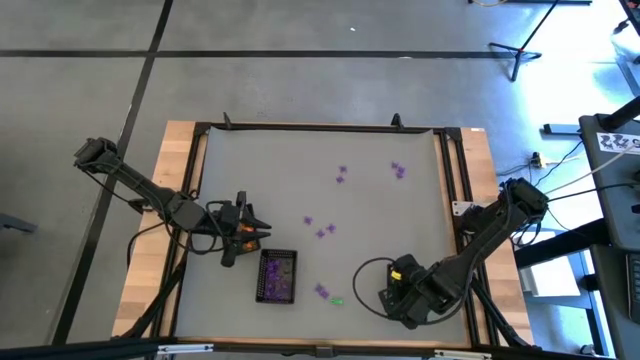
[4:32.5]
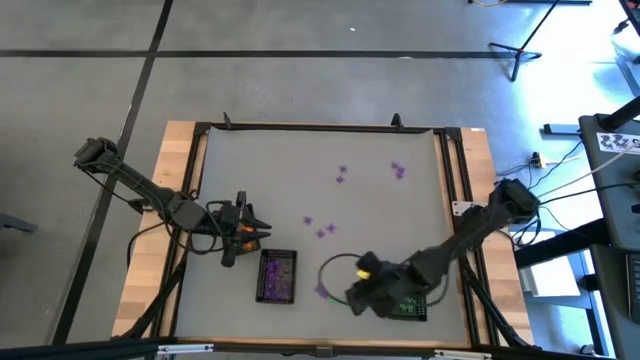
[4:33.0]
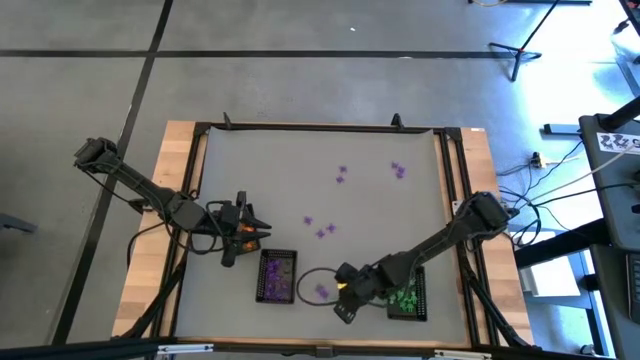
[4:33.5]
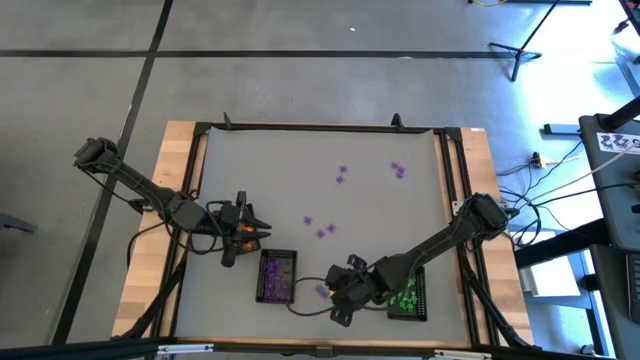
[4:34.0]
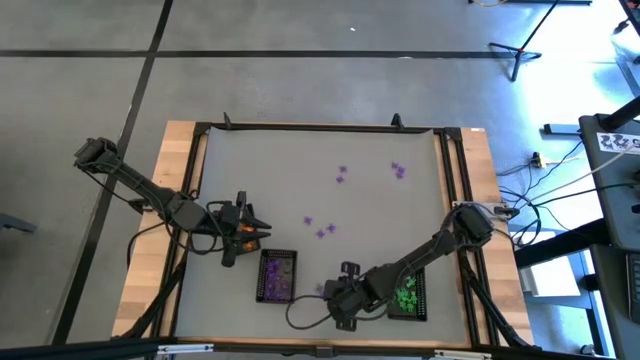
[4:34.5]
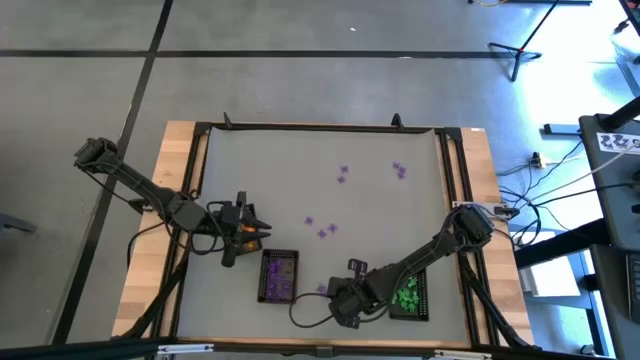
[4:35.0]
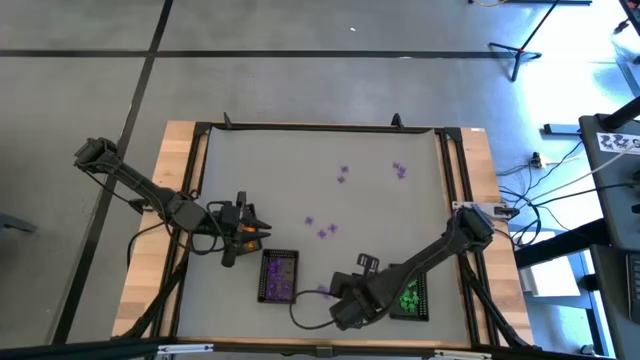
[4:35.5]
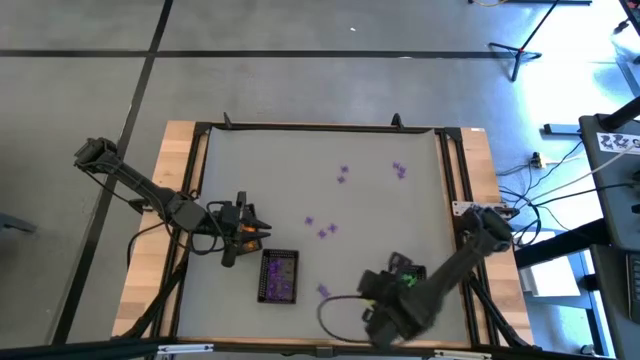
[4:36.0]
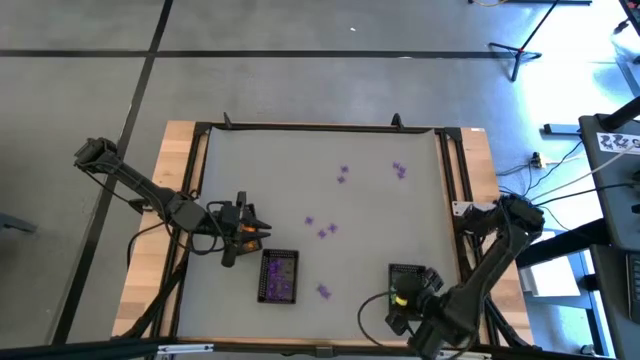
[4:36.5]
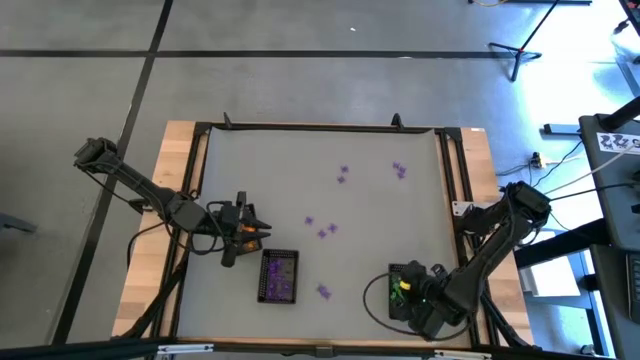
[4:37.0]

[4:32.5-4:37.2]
Task: Sort Halloween decoration
Put the green skeleton toy into the bottom right black basket

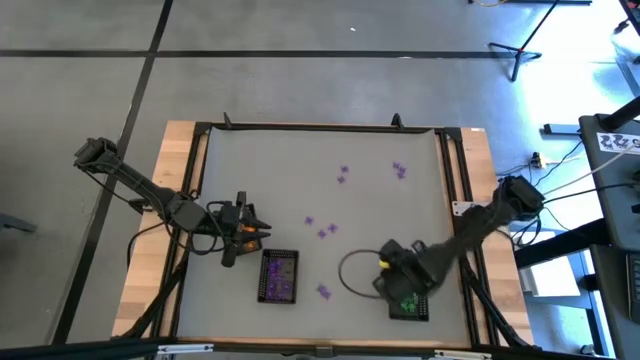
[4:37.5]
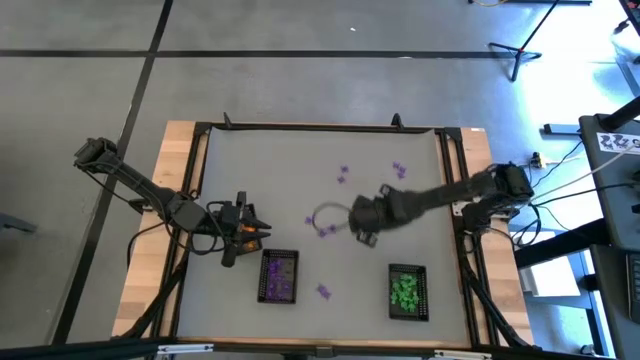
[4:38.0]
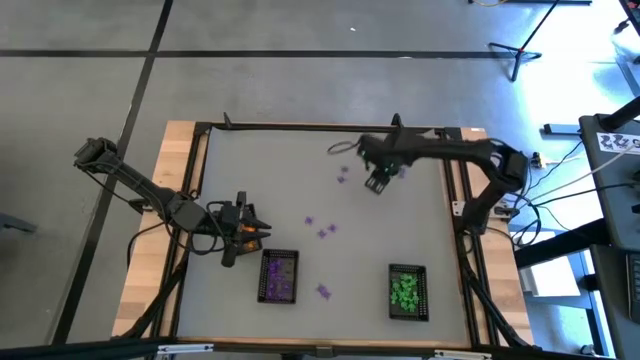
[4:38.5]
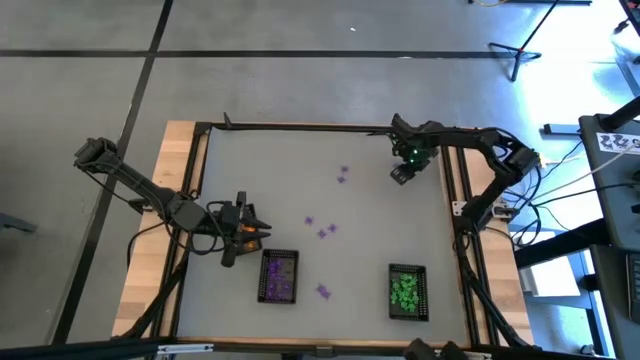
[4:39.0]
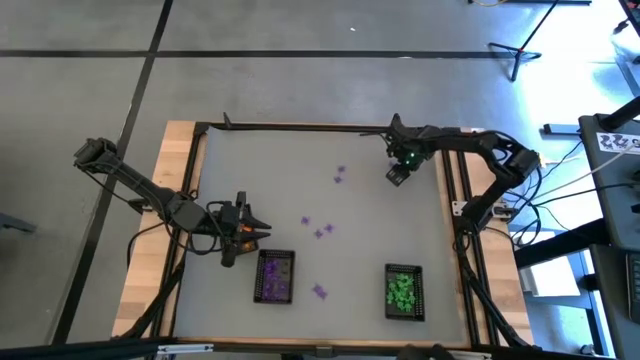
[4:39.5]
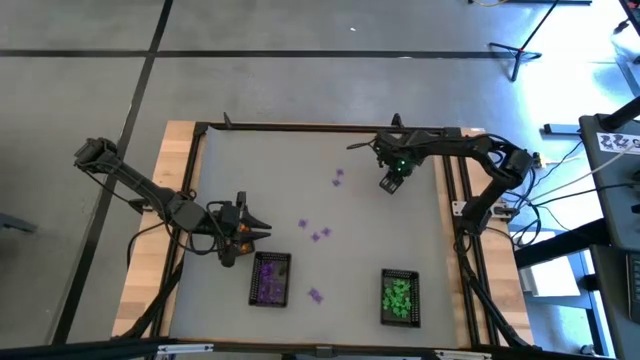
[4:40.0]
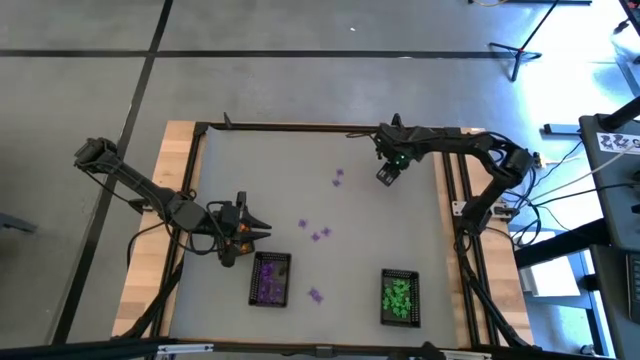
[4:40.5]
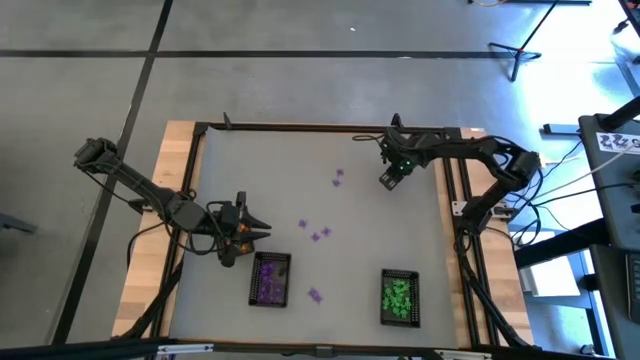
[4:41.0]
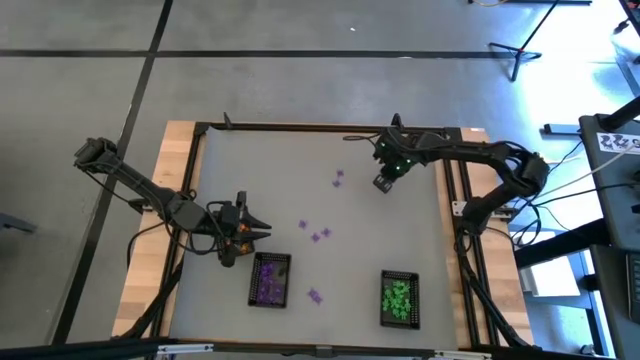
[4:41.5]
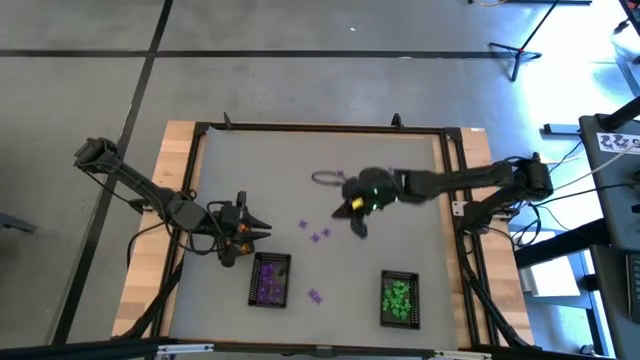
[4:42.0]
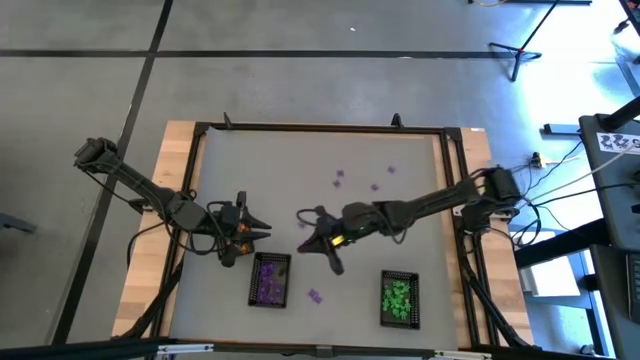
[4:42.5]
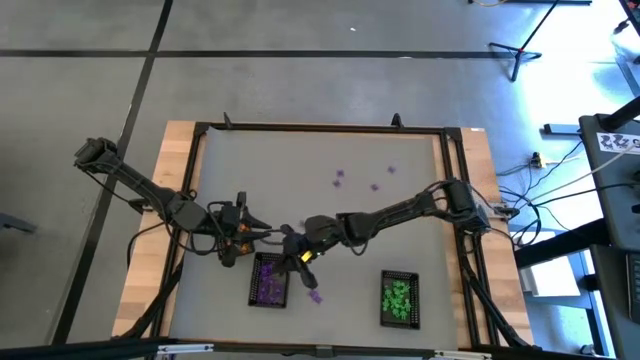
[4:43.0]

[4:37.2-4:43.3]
Put the purple spider toy into the bottom left black basket

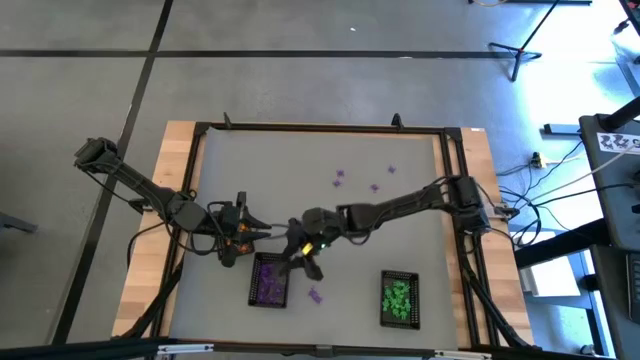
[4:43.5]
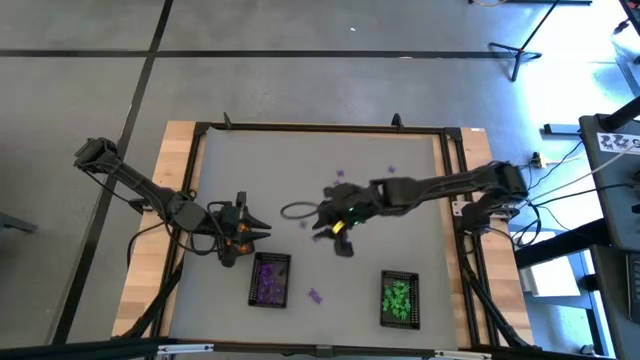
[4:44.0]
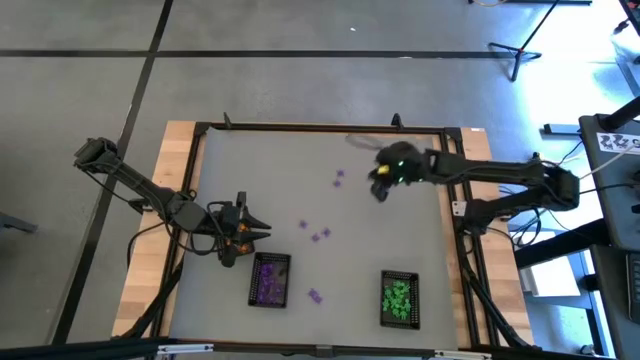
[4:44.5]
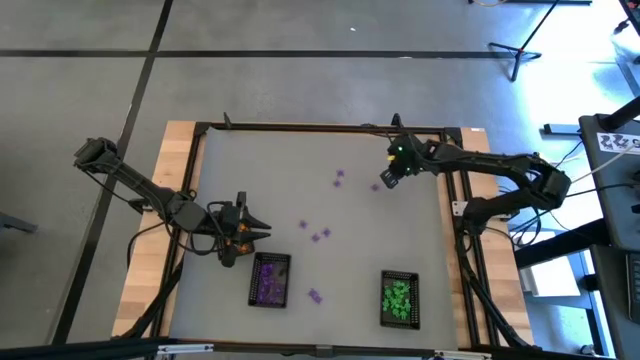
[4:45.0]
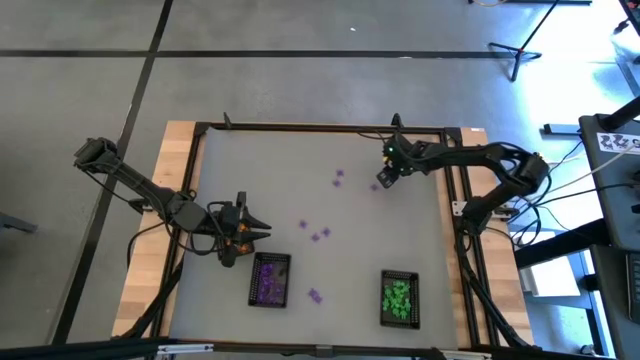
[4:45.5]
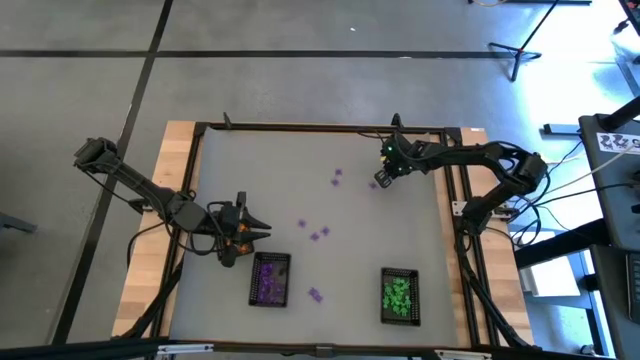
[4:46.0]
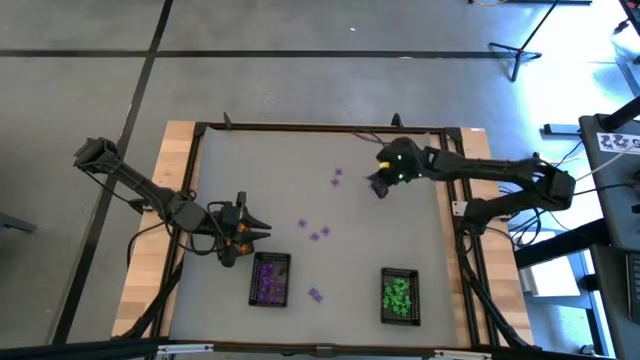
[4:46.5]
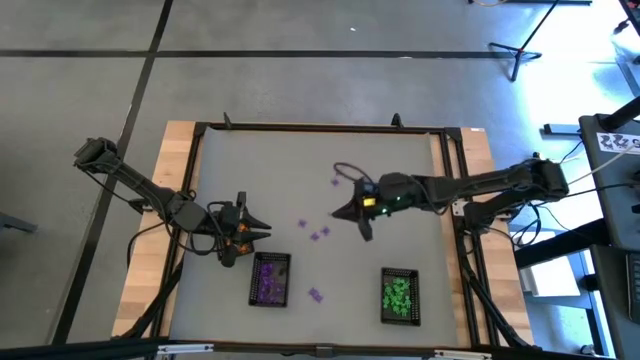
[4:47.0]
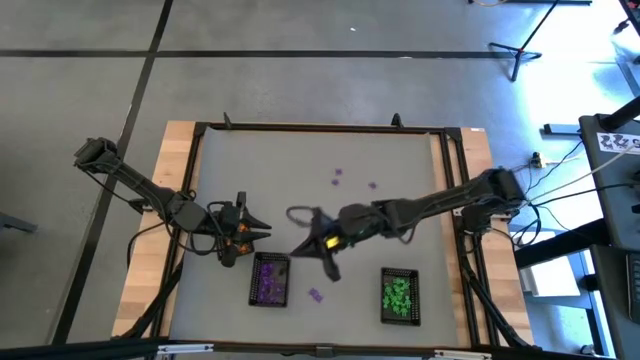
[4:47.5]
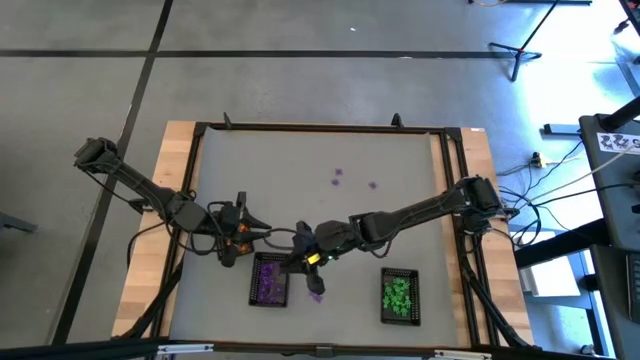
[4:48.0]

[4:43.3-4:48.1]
Put the purple spider toy into the bottom left black basket

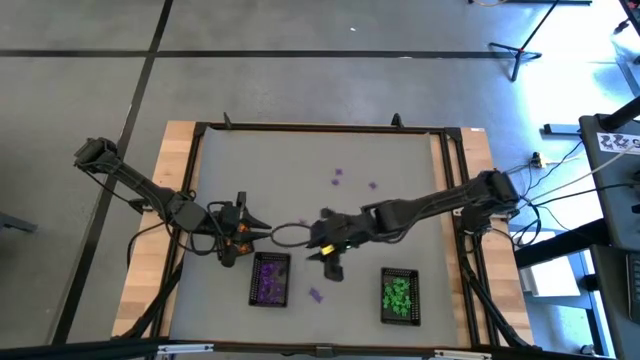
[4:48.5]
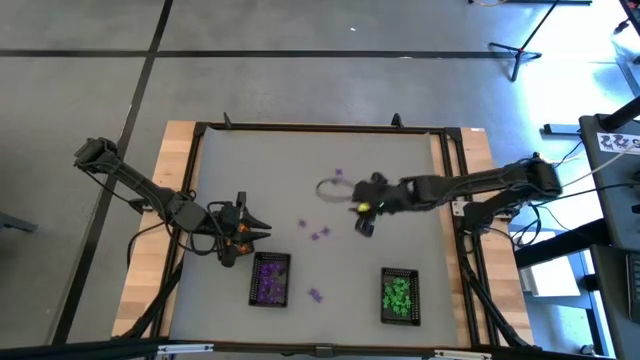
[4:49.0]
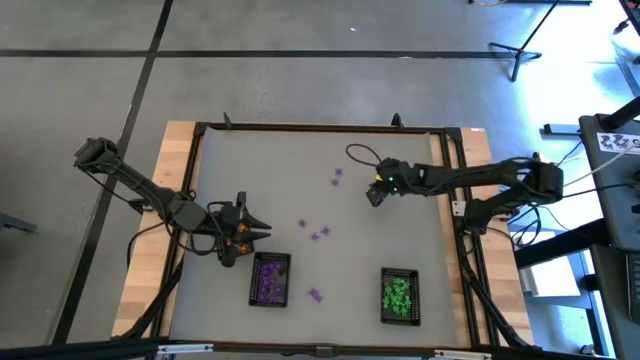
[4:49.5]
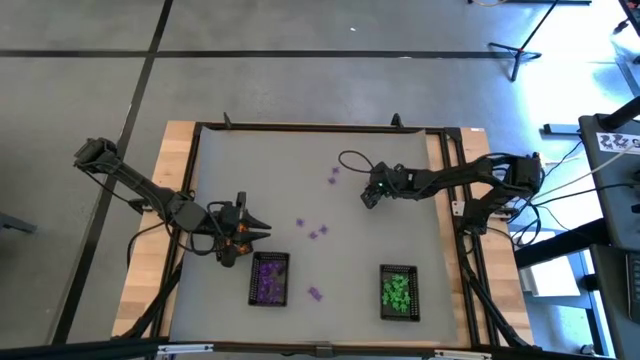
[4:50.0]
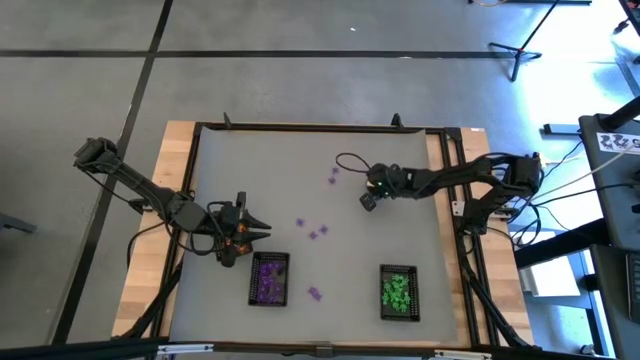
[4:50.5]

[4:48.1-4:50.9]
Put the purple spider toy into the bottom left black basket

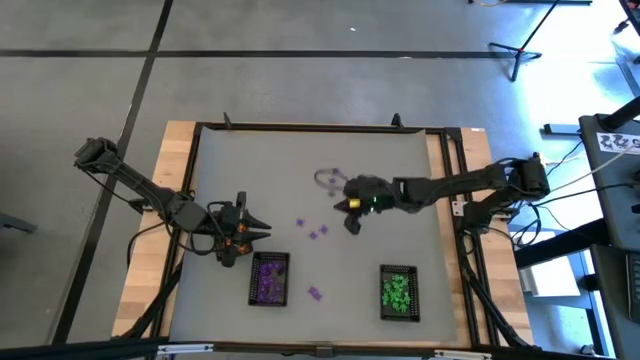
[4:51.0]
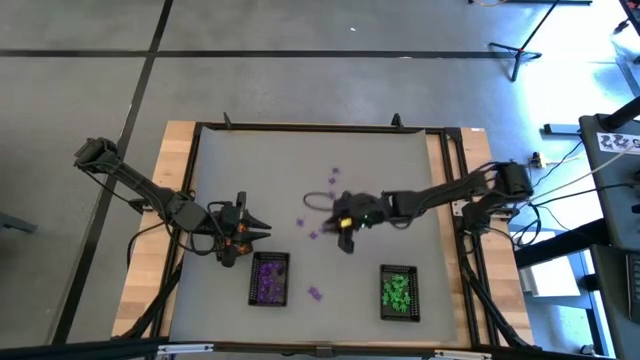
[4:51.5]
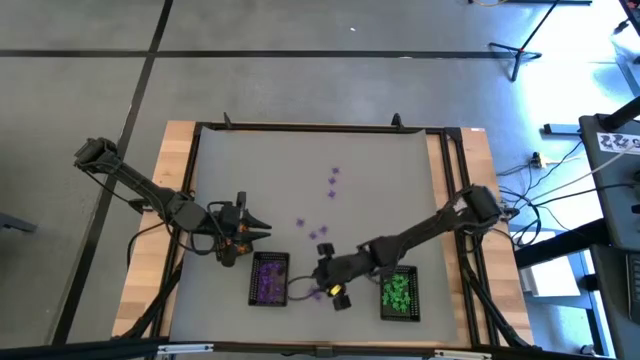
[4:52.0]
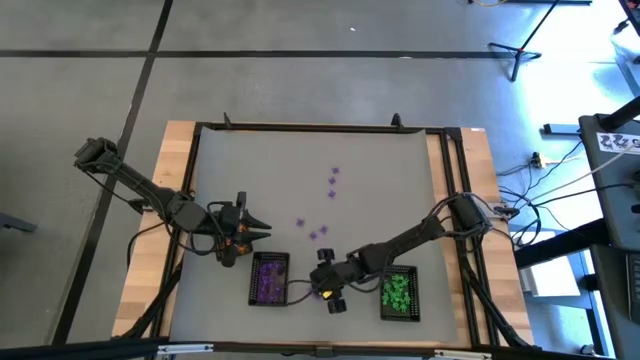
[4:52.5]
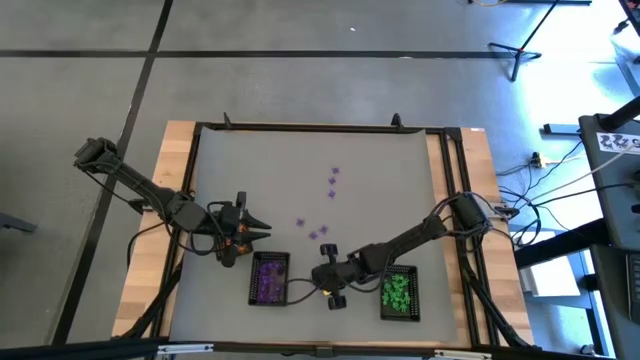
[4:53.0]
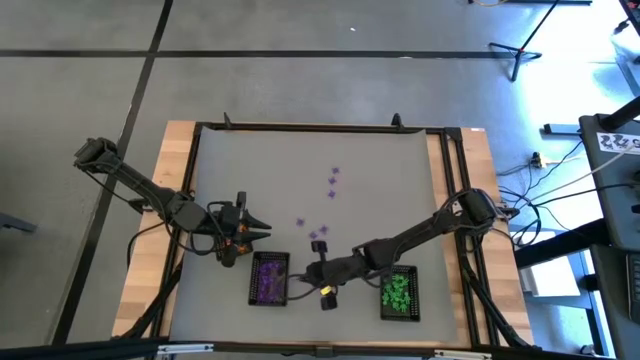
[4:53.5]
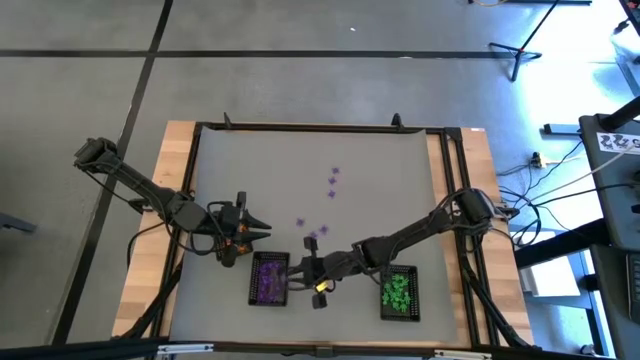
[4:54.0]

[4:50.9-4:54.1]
Put the purple spider toy into the bottom left black basket

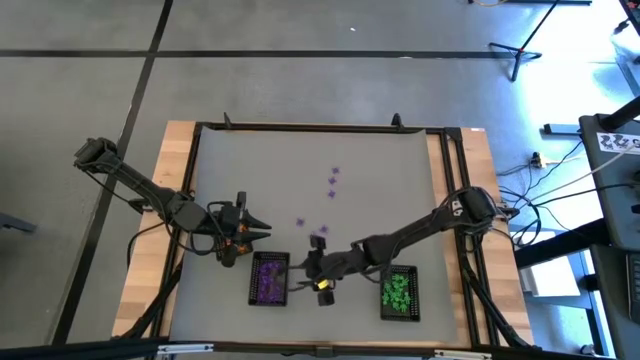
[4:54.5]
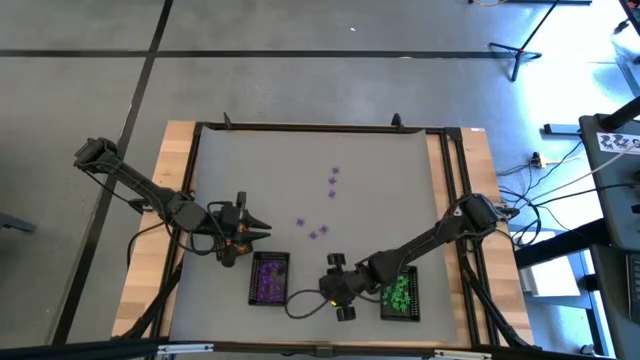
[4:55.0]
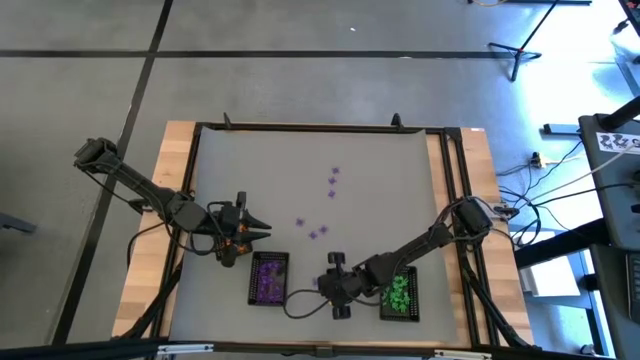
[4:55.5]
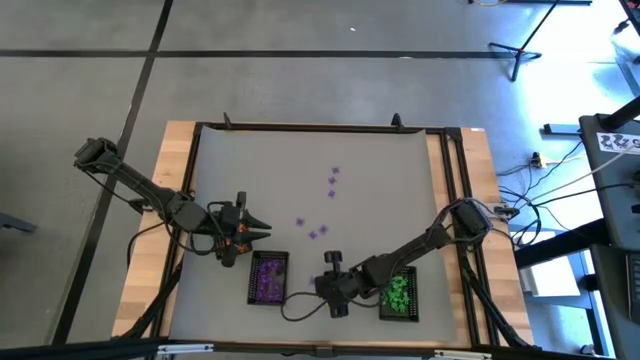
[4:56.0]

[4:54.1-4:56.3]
Put the purple spider toy into the bottom left black basket
